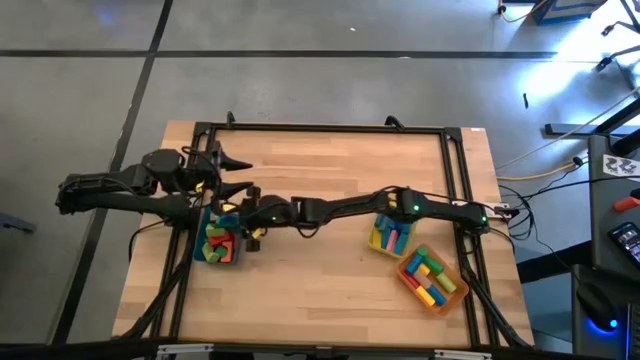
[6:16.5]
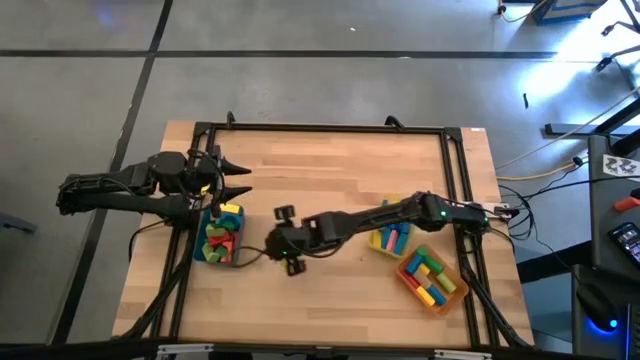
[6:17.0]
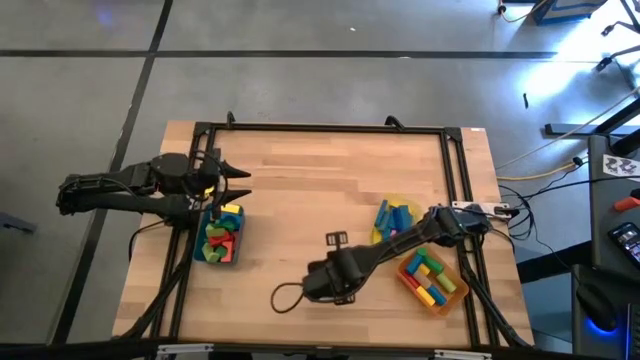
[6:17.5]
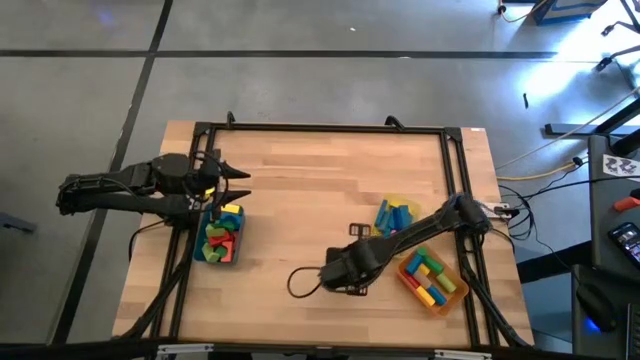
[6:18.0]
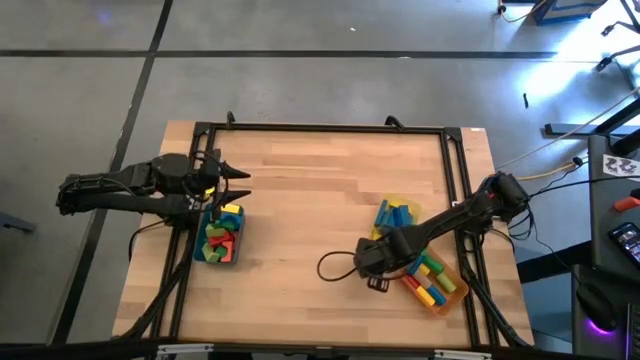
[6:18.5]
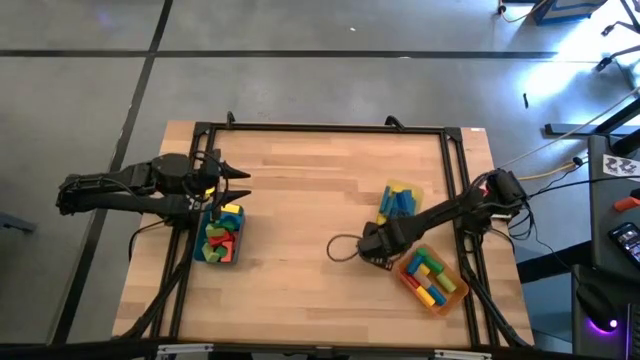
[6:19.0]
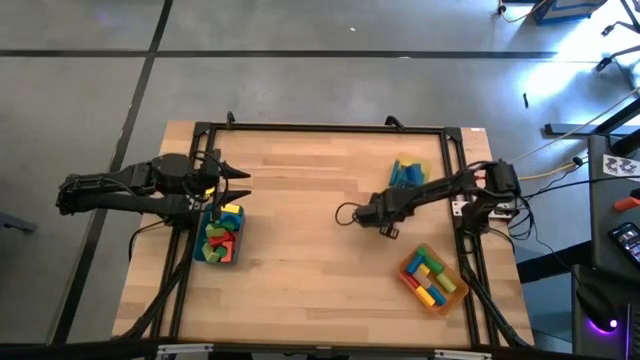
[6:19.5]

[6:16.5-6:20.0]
Task: Sort blocks by size
Move the yellow bin to the top right of the table

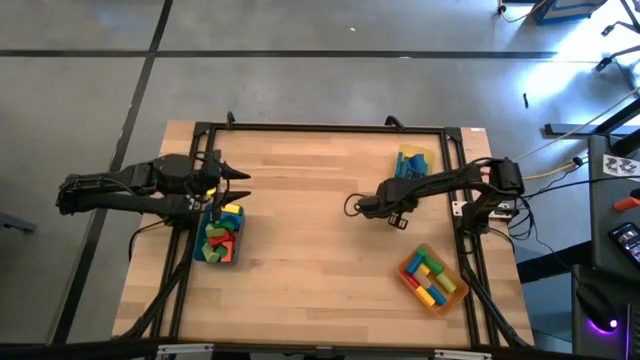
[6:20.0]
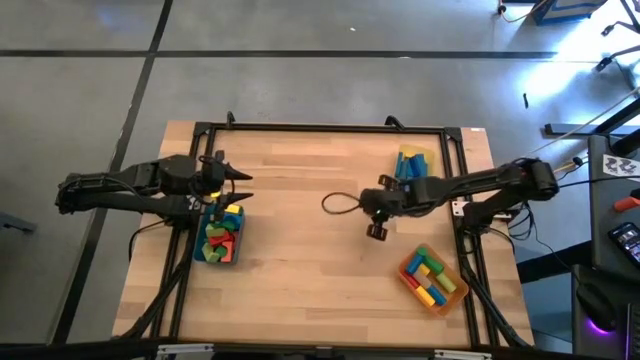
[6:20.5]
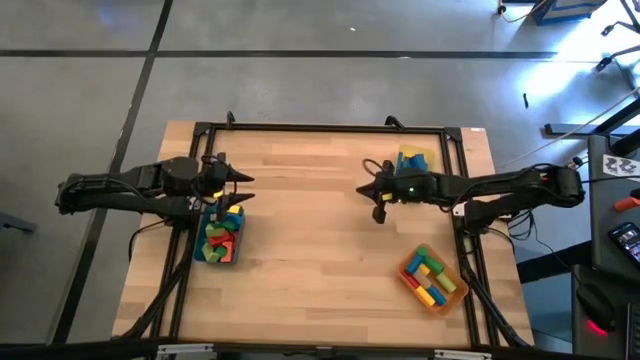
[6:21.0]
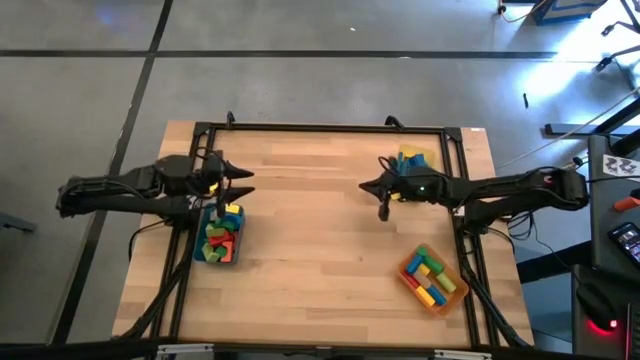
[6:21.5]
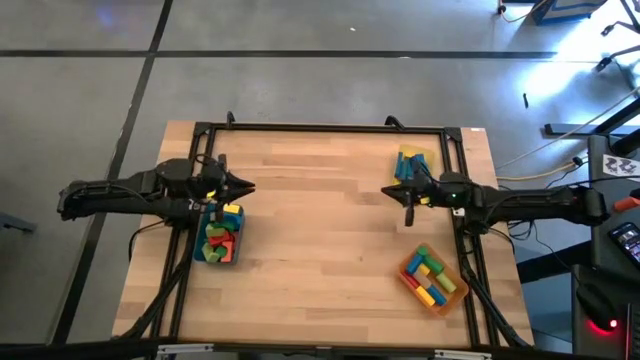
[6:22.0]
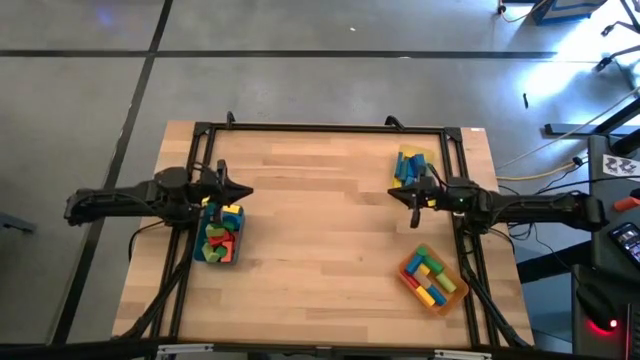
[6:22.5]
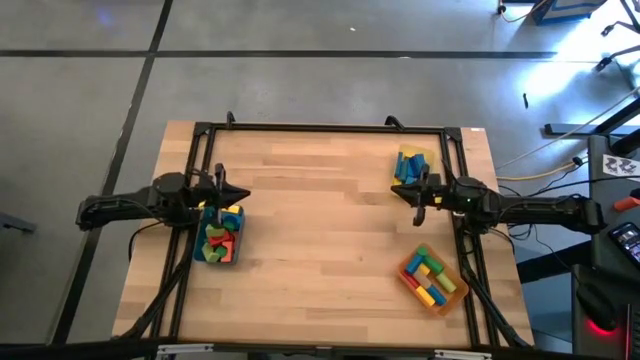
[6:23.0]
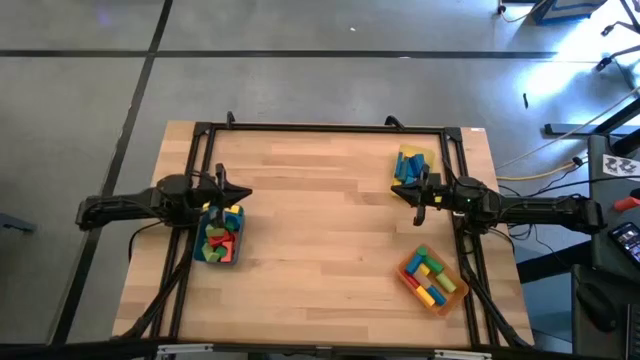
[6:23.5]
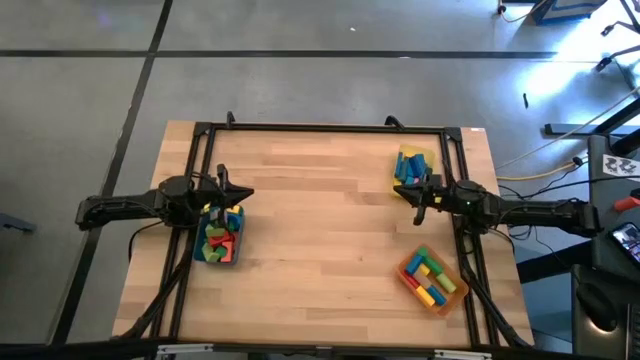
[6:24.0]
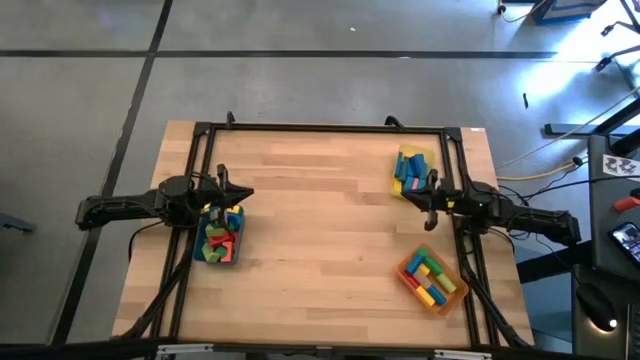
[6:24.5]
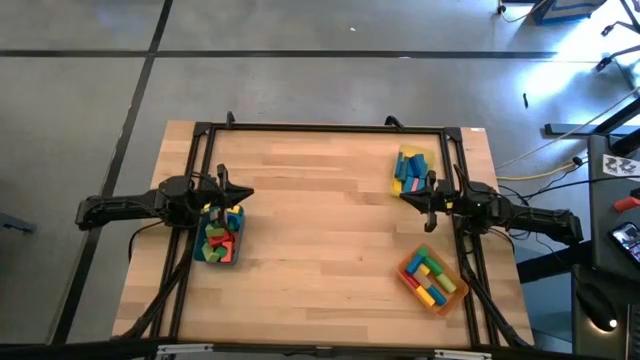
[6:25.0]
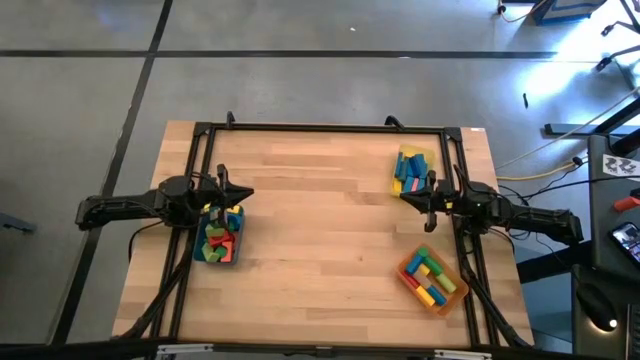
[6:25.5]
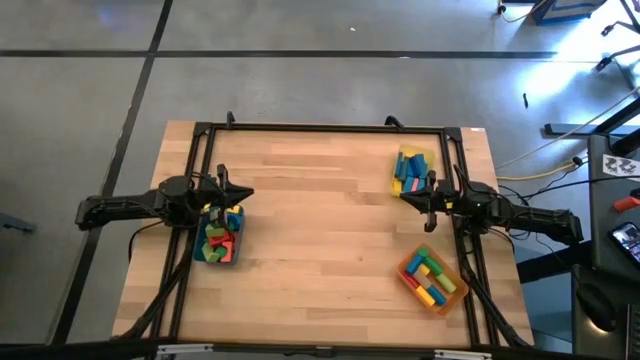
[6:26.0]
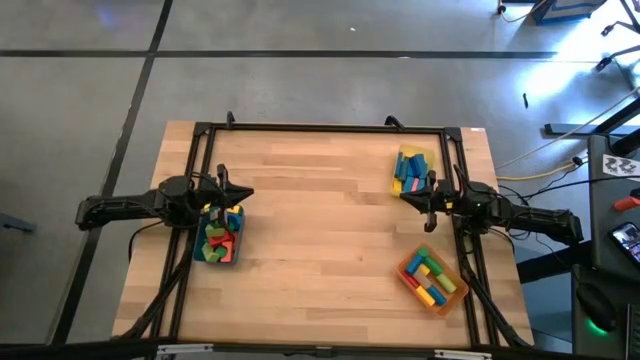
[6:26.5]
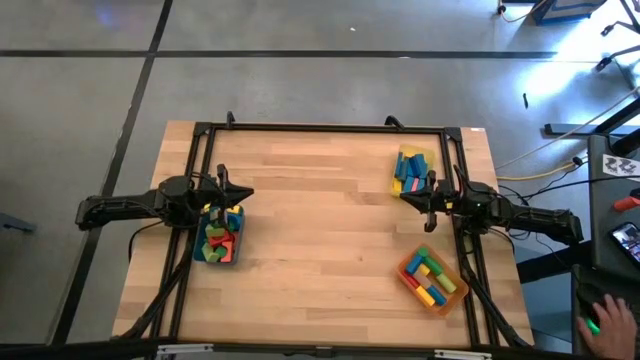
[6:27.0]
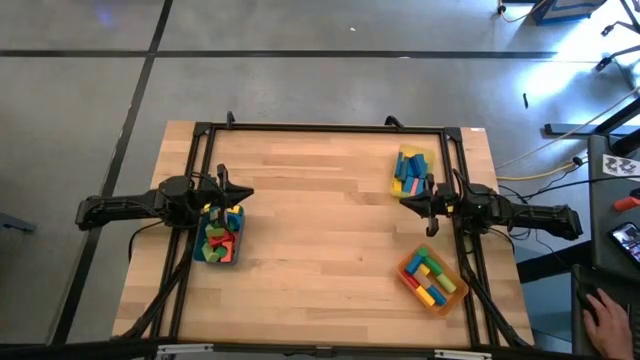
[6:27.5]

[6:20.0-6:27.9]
Return to Home Position

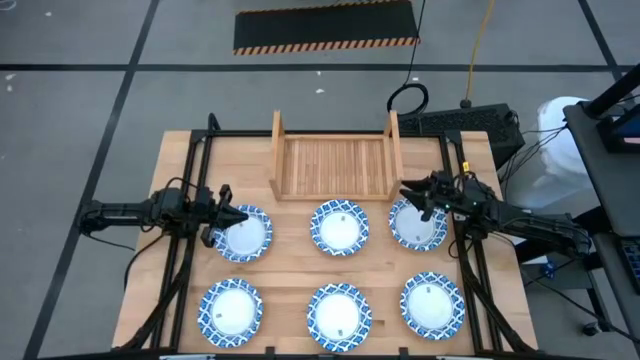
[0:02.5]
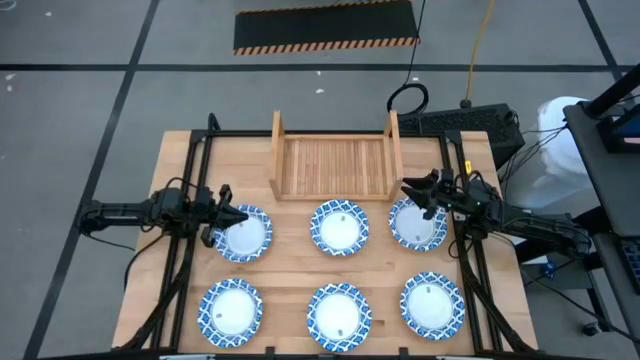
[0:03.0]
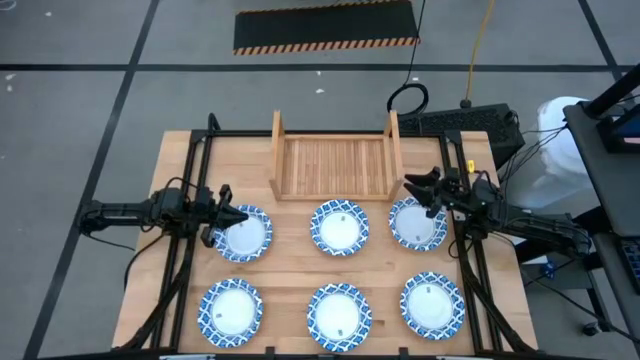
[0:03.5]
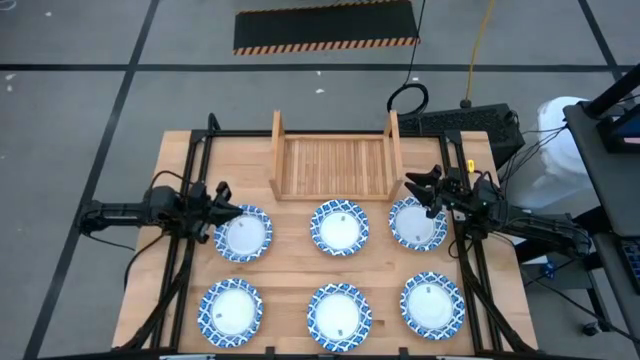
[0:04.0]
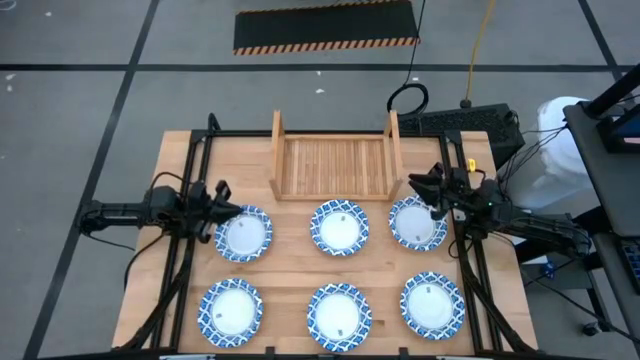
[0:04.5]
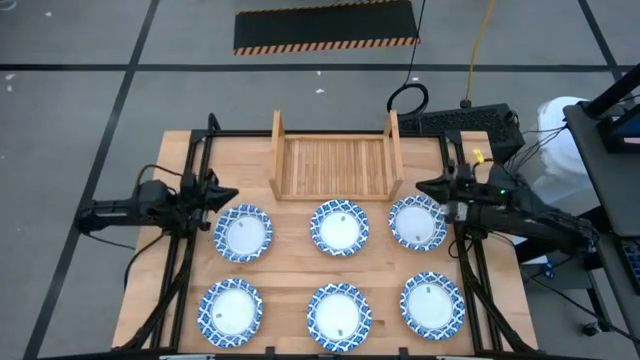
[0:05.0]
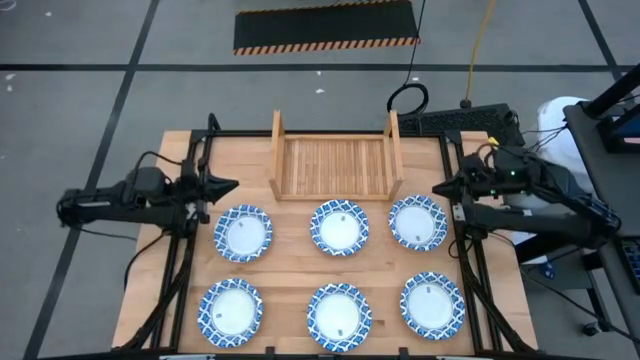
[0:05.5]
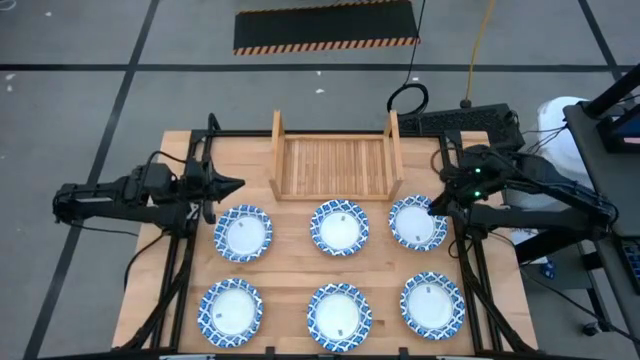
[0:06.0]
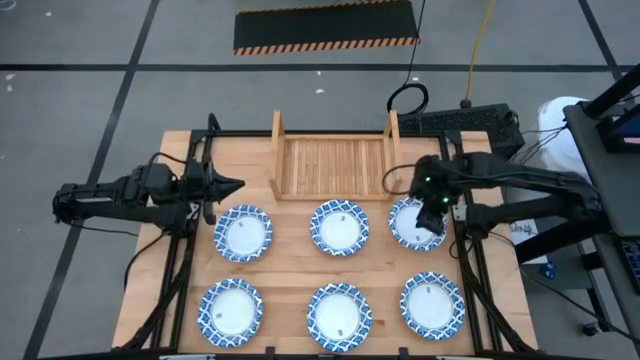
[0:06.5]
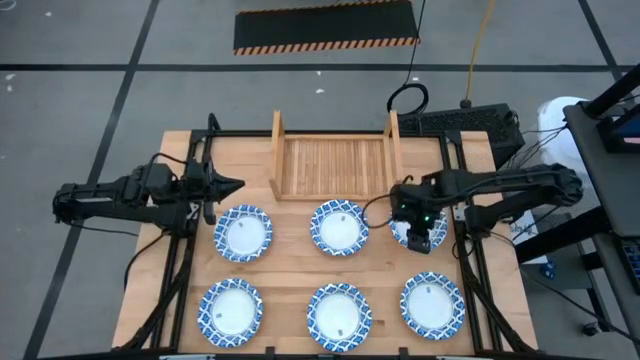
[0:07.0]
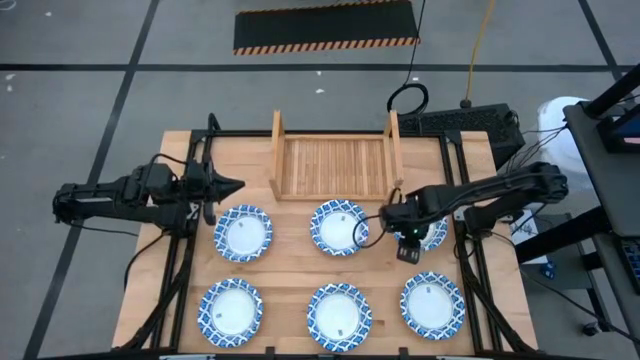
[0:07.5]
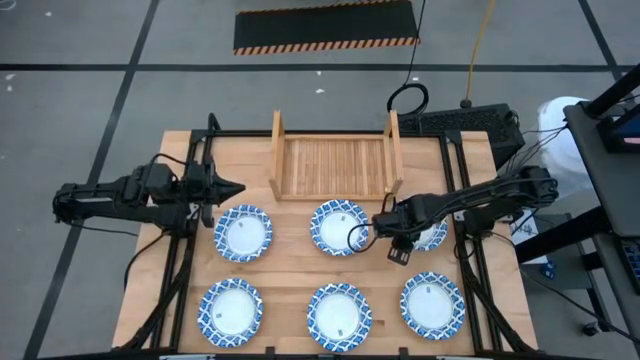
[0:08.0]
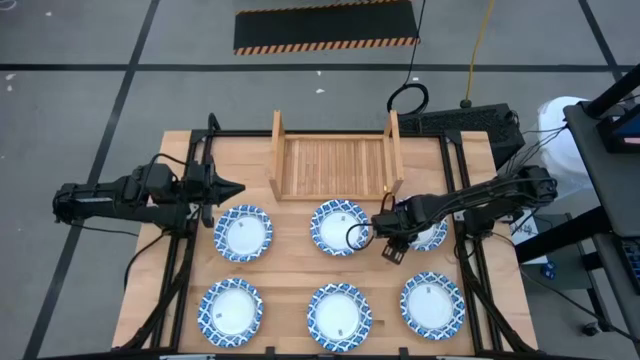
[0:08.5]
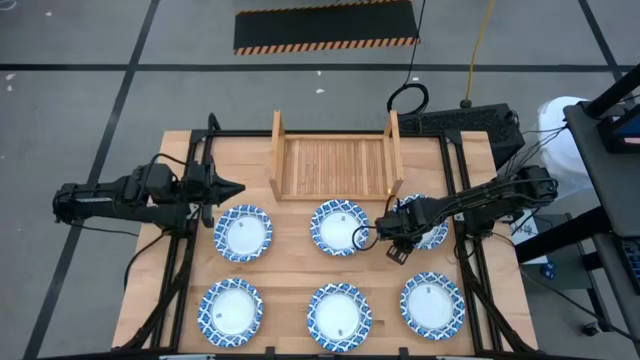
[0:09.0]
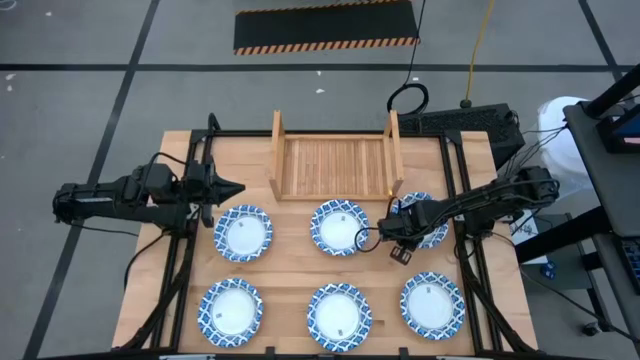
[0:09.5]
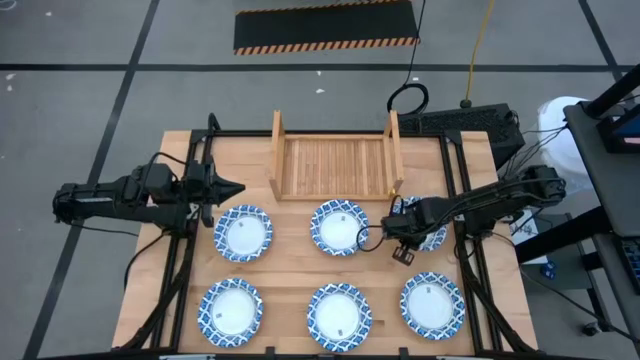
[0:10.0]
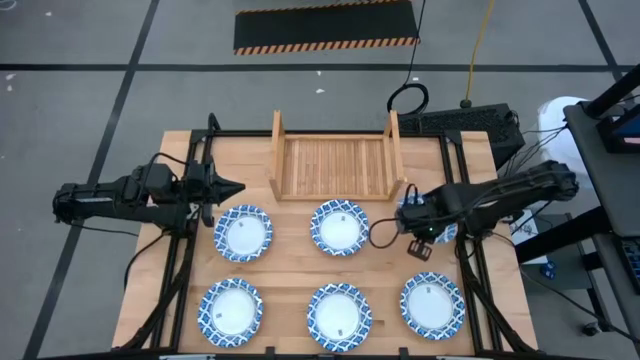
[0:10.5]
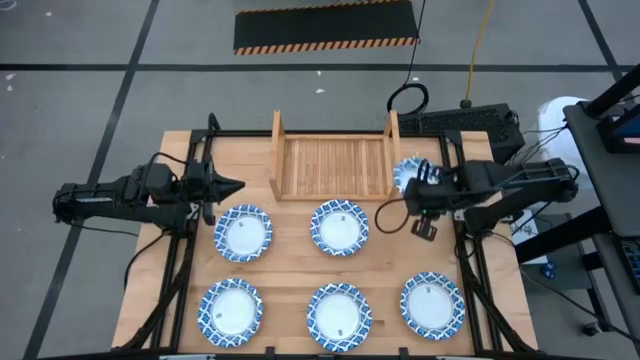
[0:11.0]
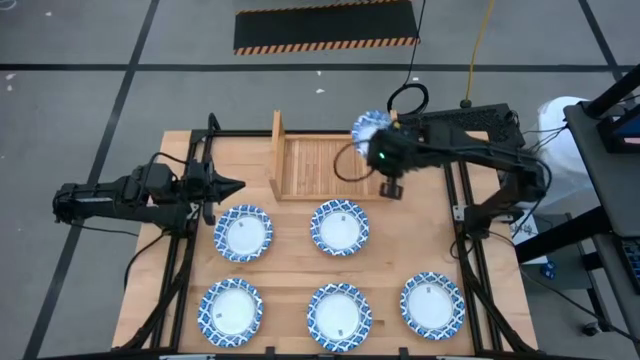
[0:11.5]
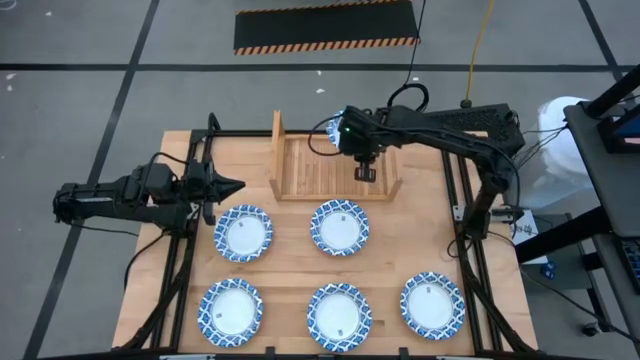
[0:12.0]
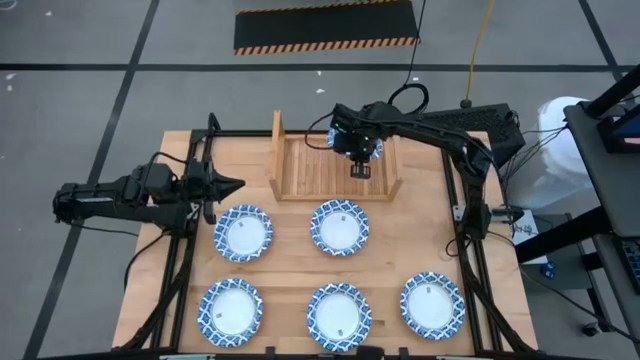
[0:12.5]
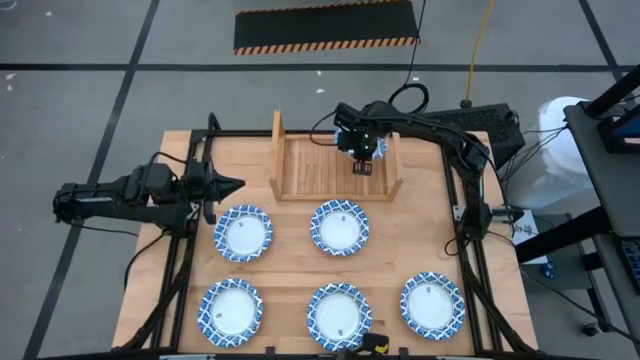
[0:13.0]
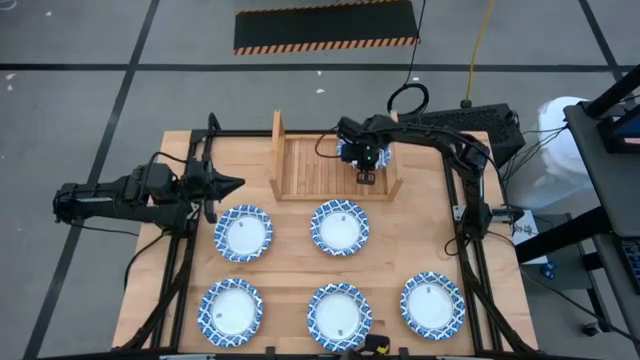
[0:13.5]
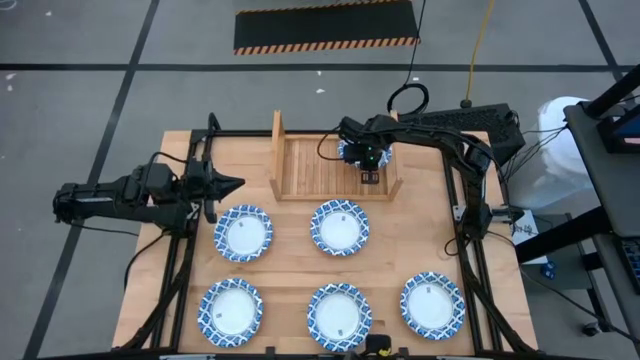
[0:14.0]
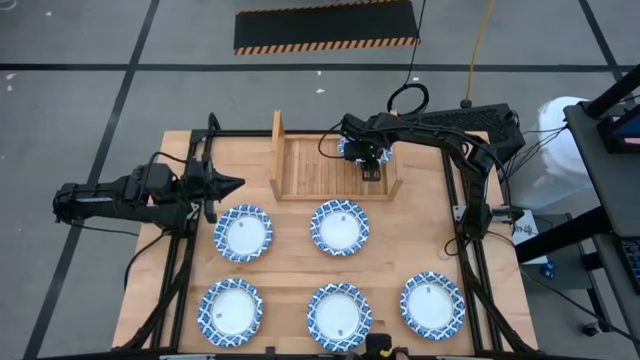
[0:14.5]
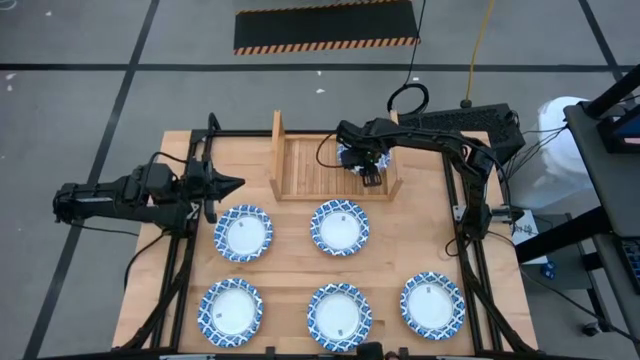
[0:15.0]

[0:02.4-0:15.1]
Task: Place and stack bowls onto a shelf
Put the blue patterned bowl on the shelf
